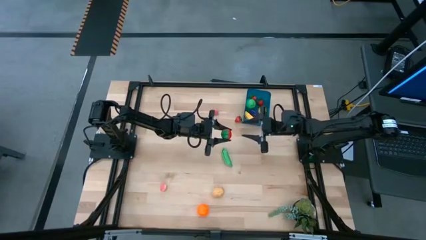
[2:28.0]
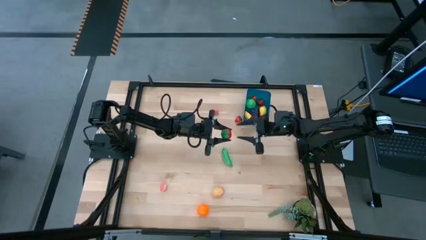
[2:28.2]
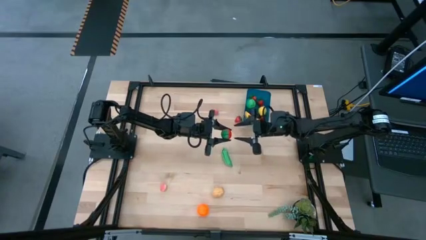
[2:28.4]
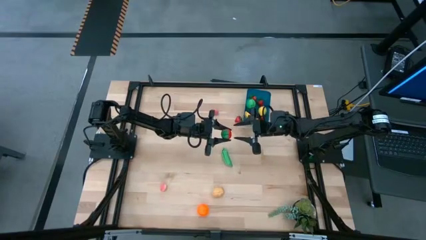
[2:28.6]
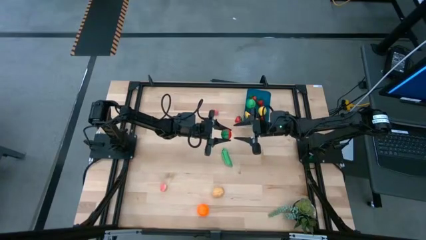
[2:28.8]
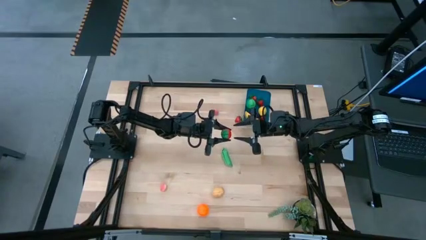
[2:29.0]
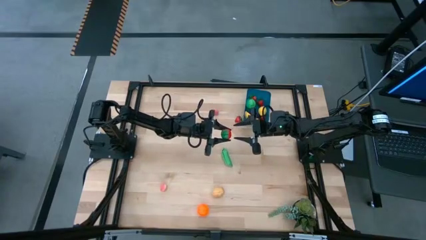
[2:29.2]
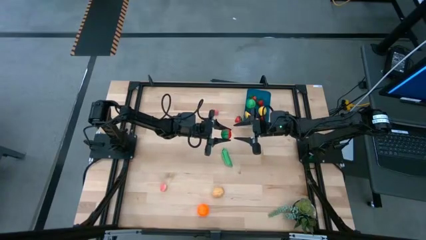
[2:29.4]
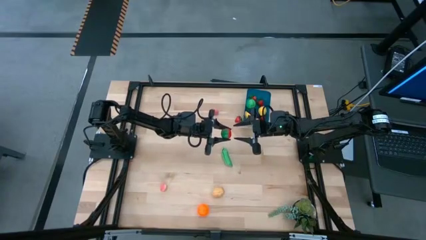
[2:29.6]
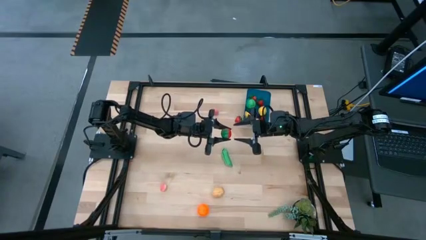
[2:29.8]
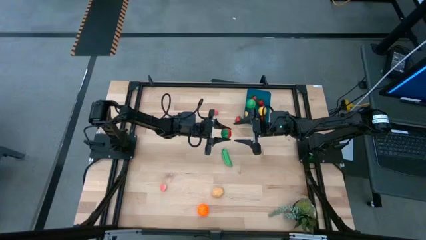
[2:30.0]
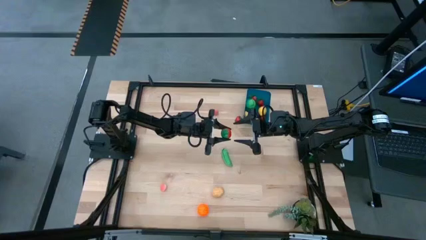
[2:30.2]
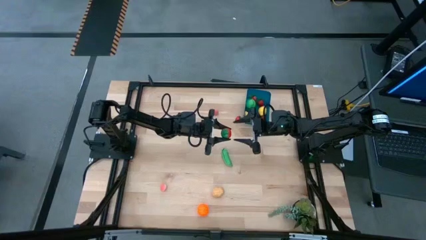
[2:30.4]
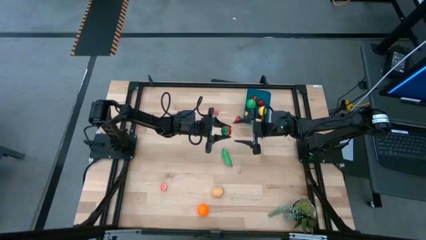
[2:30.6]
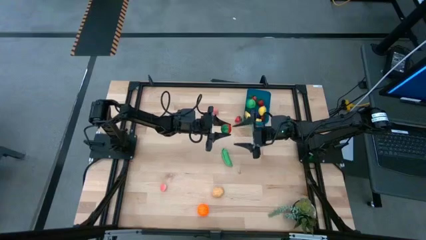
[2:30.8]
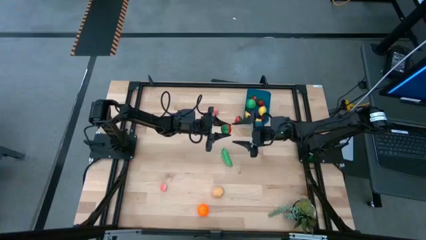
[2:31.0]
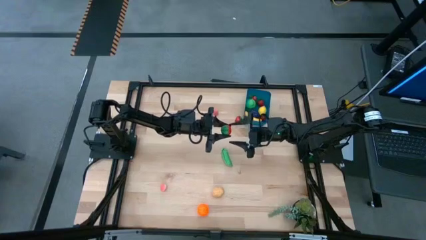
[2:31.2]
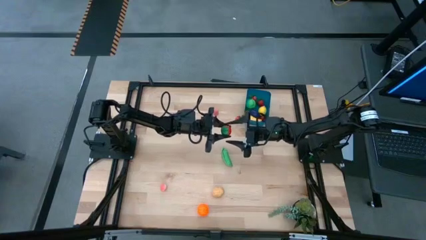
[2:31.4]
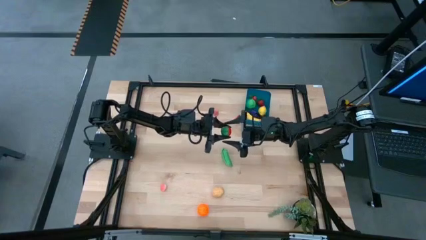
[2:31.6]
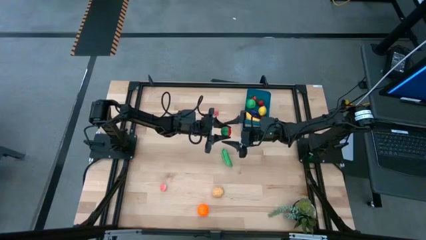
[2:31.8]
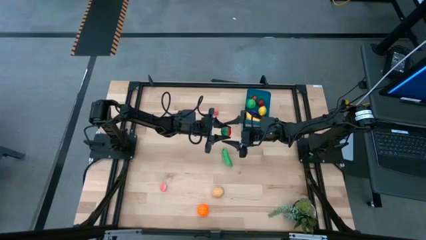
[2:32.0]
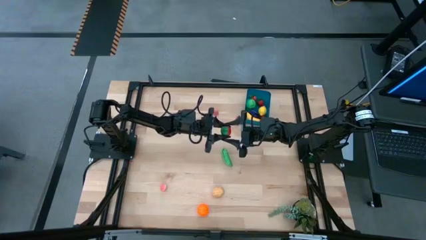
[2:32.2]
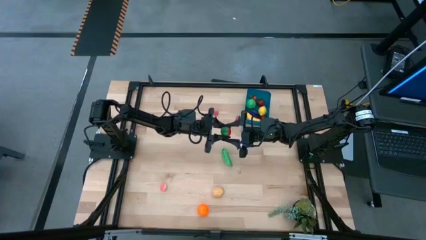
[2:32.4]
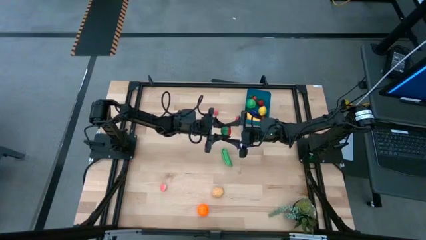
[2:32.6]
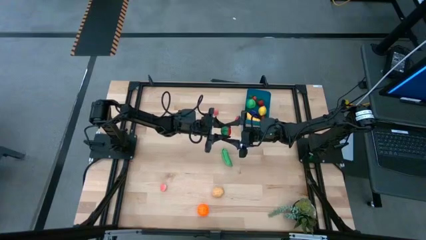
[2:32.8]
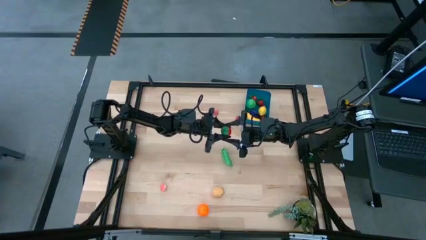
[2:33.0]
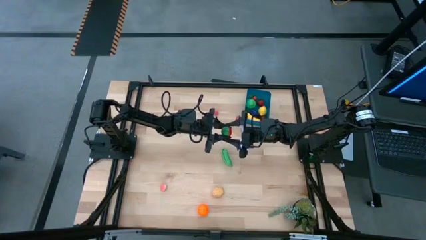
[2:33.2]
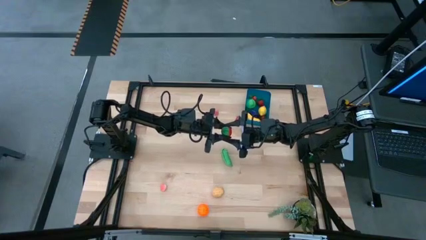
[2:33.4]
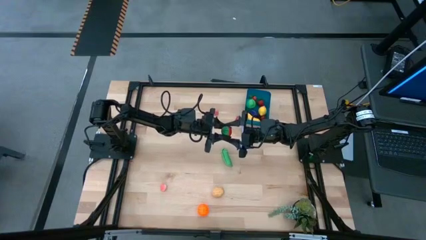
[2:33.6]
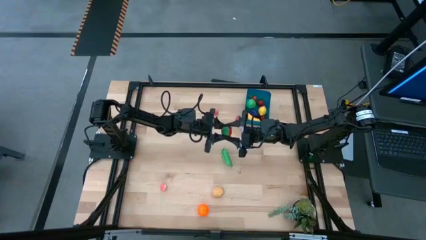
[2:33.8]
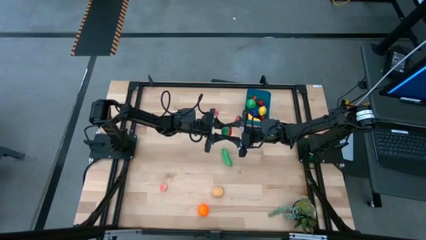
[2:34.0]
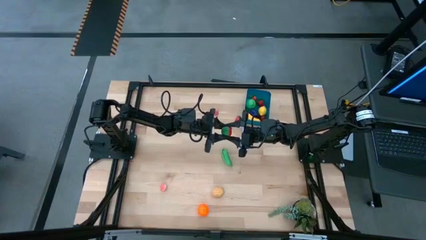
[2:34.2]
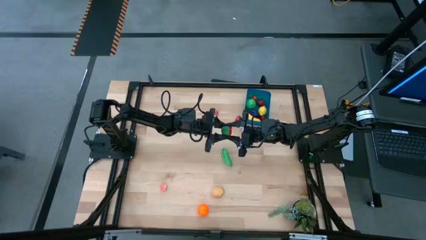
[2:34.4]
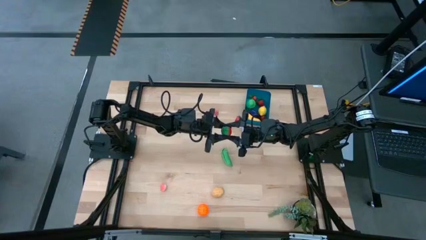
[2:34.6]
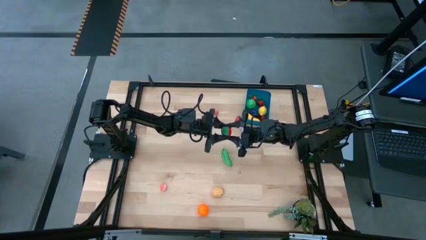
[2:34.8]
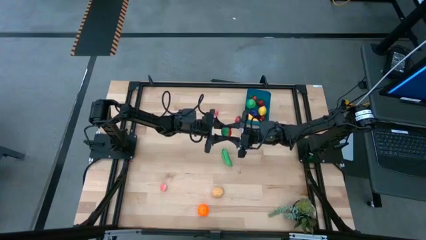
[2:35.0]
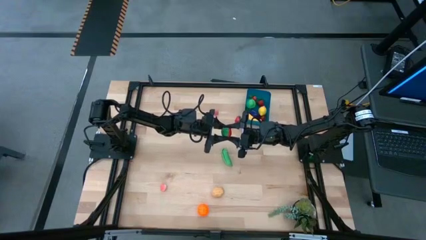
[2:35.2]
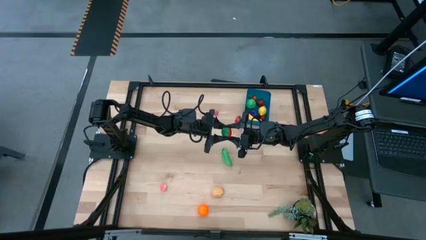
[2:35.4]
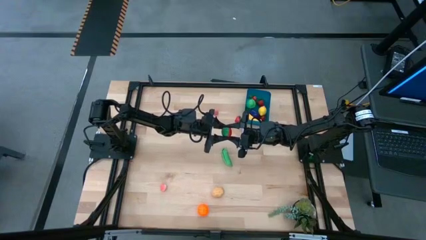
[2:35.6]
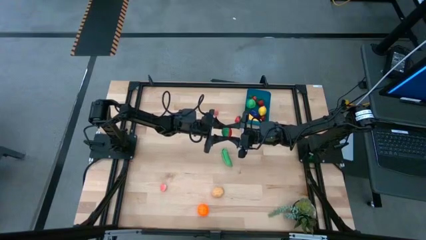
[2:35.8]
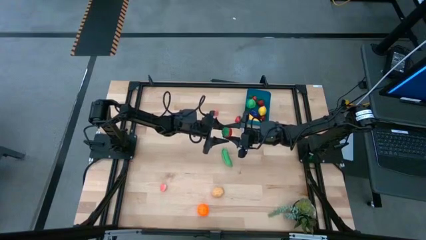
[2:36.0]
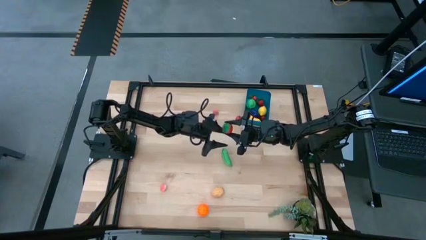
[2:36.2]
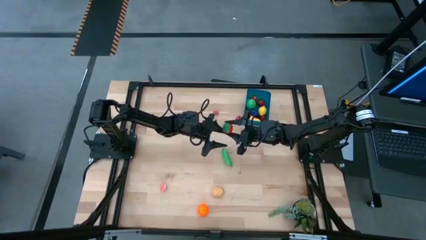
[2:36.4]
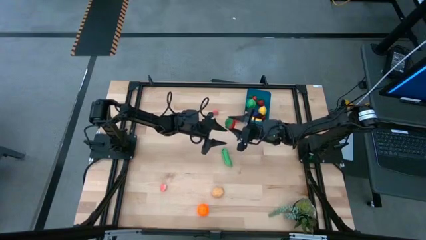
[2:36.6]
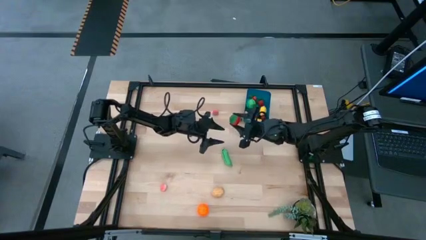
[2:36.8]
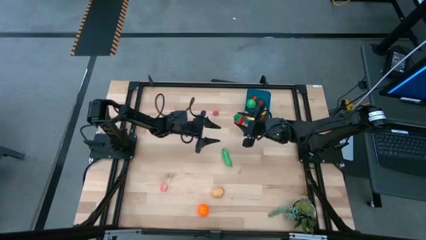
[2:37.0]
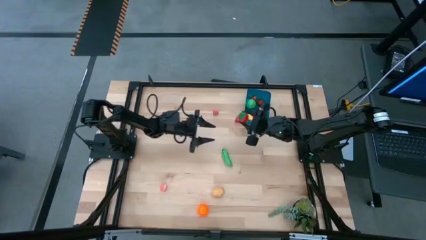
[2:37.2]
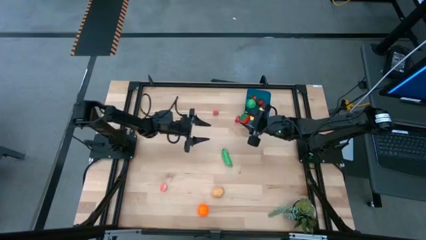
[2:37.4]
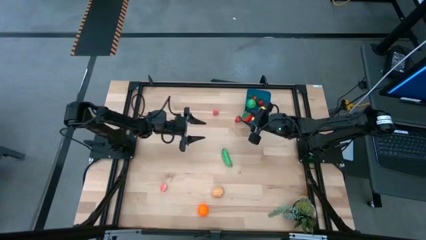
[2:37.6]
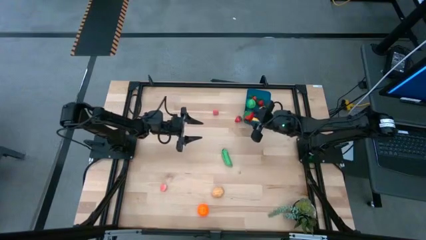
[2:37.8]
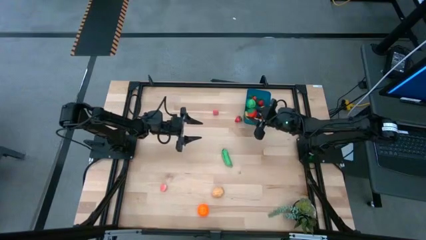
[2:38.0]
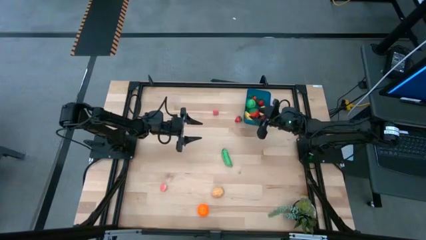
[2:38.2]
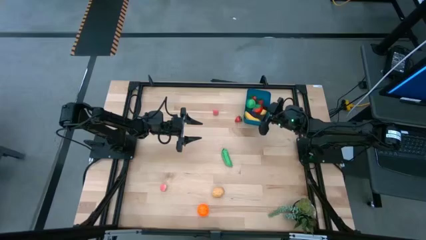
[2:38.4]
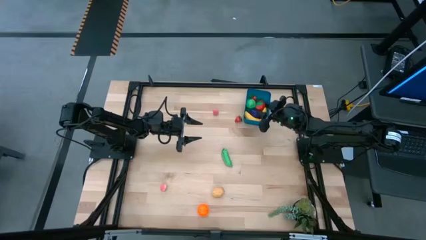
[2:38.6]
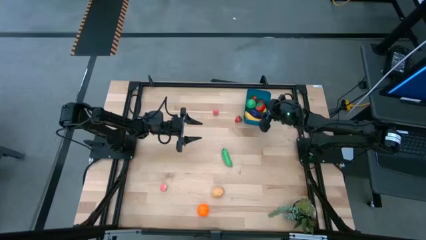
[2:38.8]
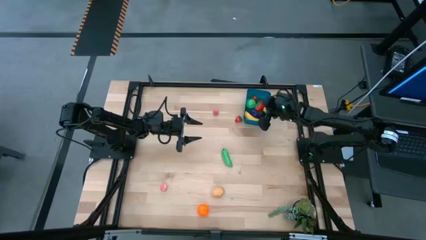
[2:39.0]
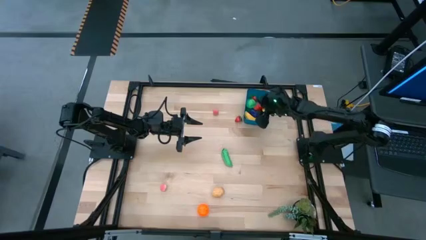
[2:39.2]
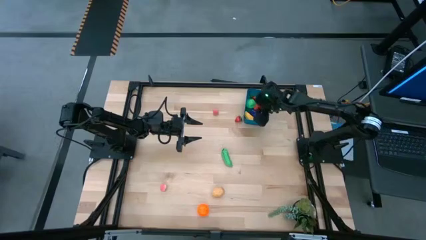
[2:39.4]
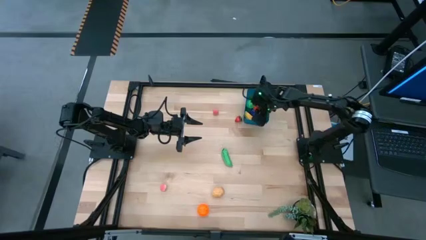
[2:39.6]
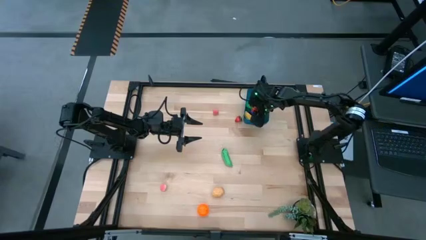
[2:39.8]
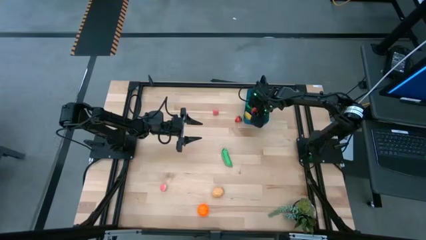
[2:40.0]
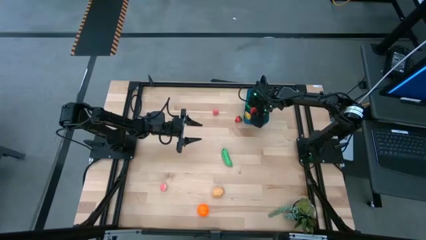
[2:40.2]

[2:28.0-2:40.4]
Task: Pick and placing Produce into tupperware
Put the red strawberry into the blue bin

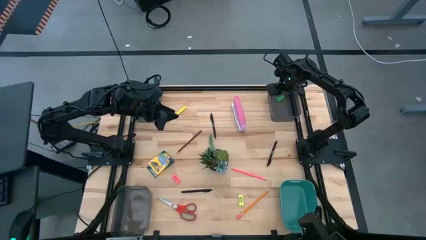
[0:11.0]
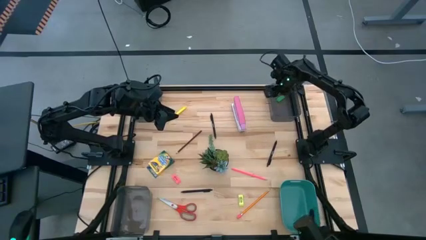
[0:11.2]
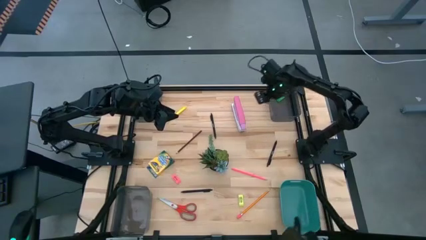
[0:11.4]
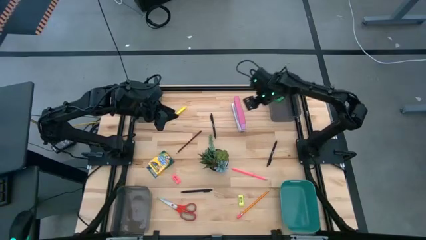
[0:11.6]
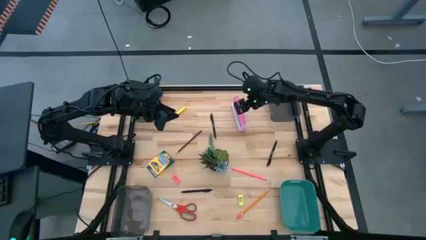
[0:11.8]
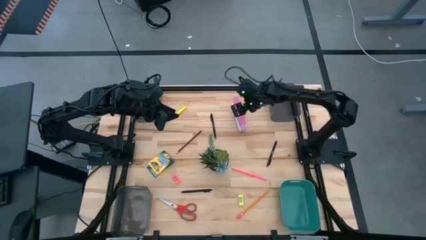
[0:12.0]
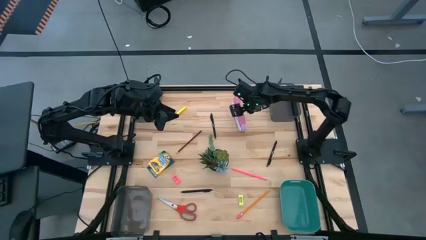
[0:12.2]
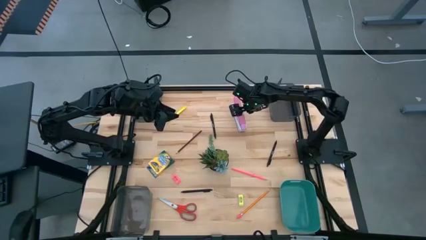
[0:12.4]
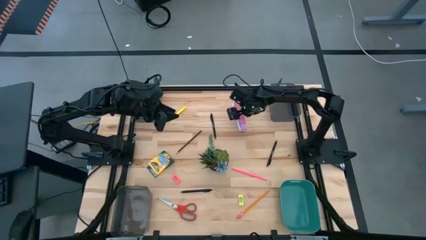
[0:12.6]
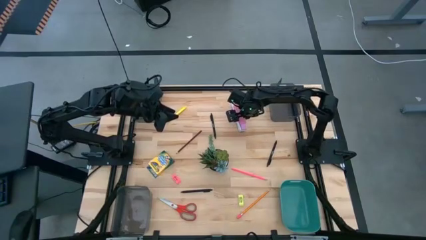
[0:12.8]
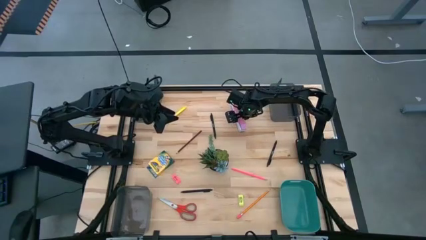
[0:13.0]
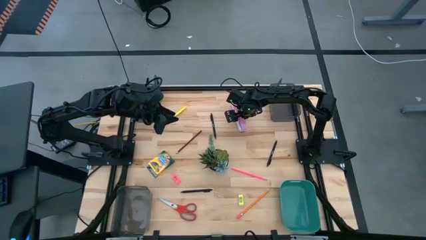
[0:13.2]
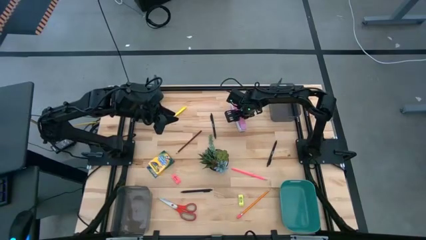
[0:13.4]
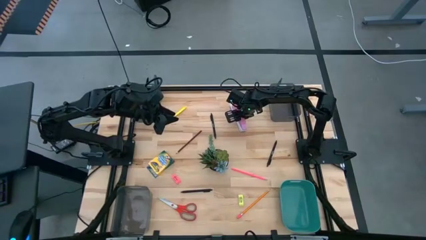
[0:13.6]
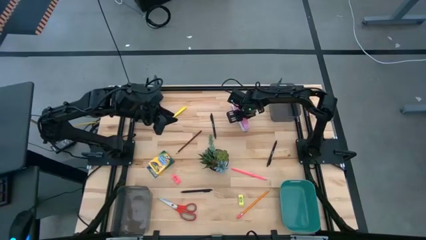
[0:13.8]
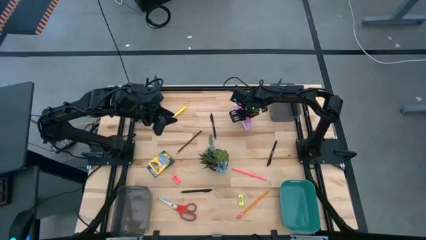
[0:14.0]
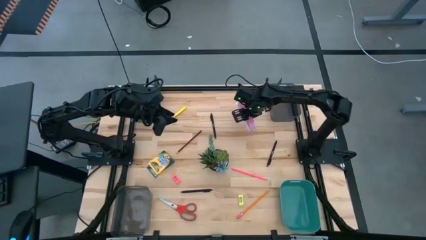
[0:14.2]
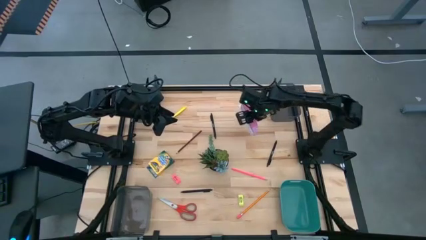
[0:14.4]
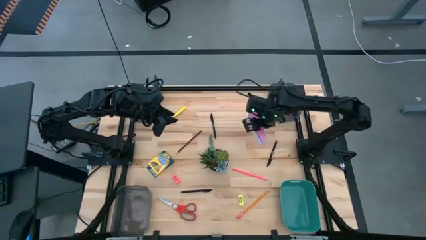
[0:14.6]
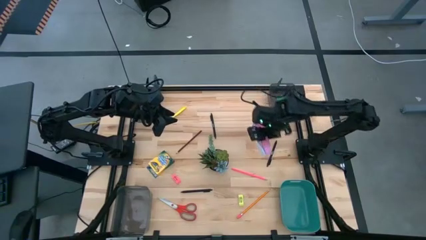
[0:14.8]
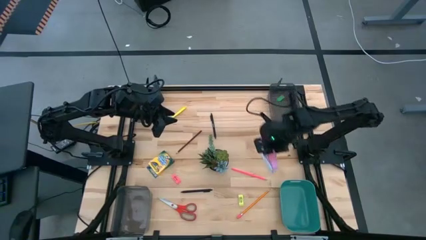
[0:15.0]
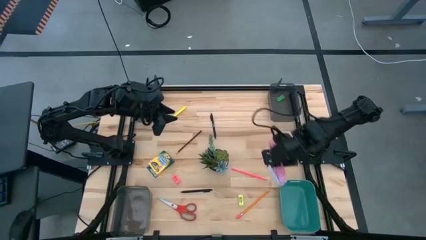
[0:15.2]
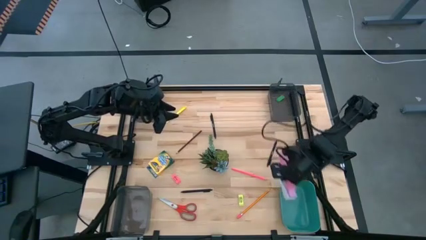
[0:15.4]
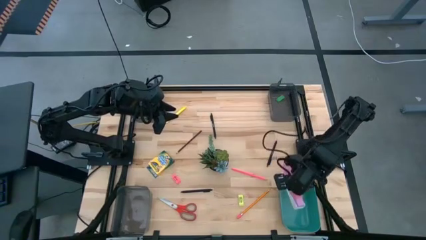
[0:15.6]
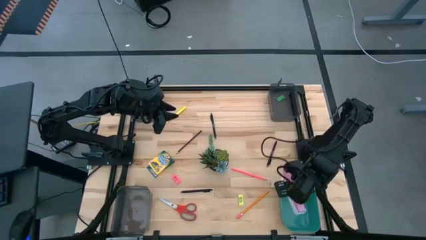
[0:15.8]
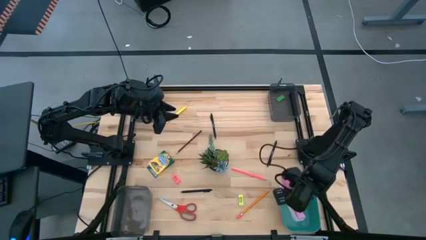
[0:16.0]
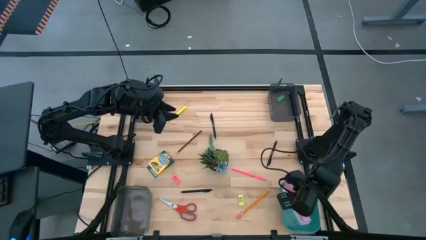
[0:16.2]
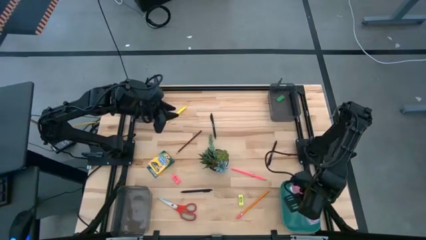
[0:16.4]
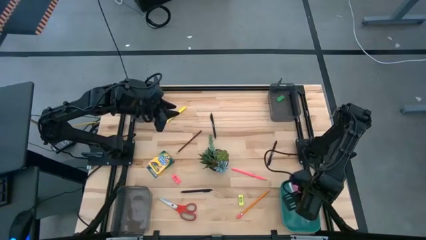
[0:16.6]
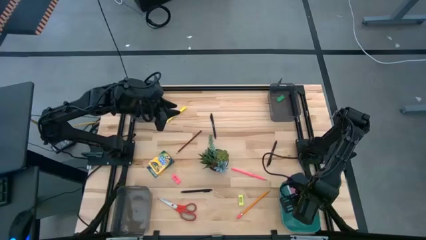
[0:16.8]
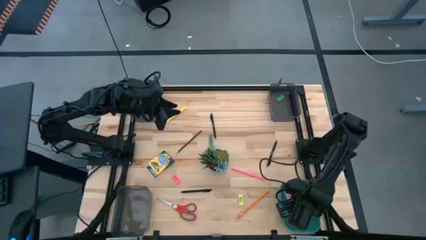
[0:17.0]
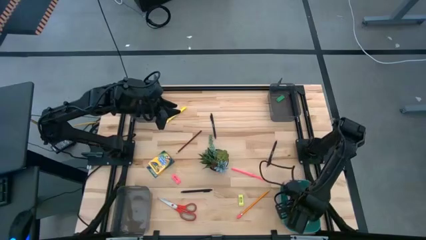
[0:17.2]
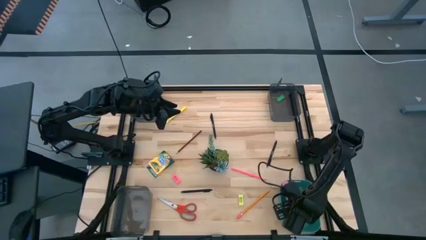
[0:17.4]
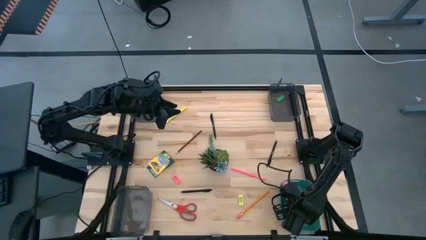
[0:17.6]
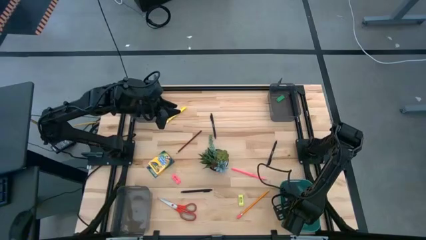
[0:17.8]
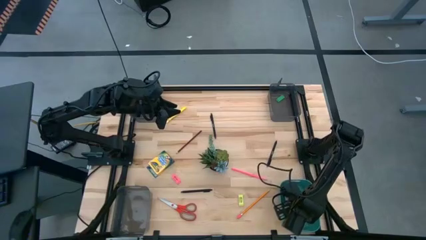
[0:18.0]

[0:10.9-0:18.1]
Task: Sort crayons/erasers/pens/pencils in bins
Put the pink stapler into the green bin
